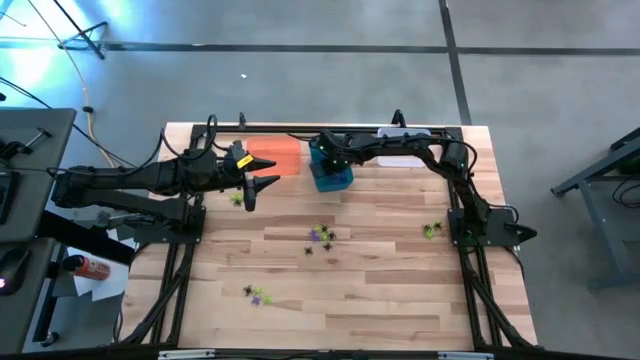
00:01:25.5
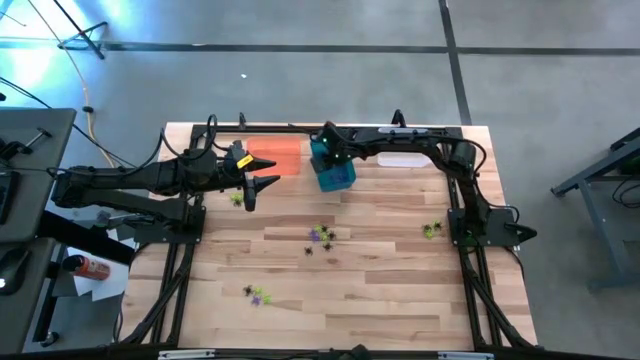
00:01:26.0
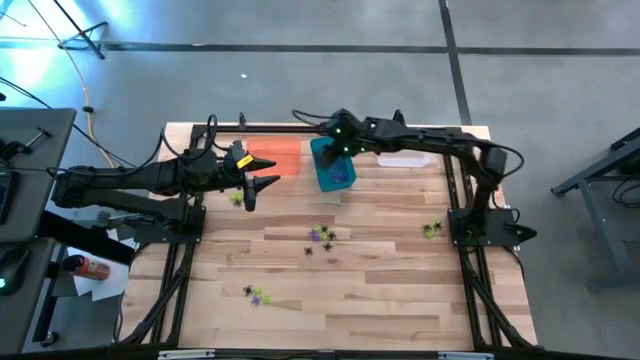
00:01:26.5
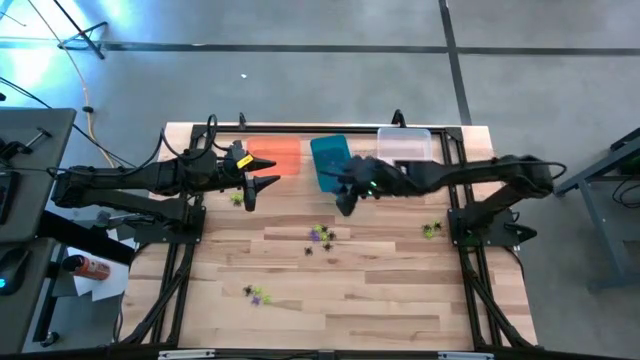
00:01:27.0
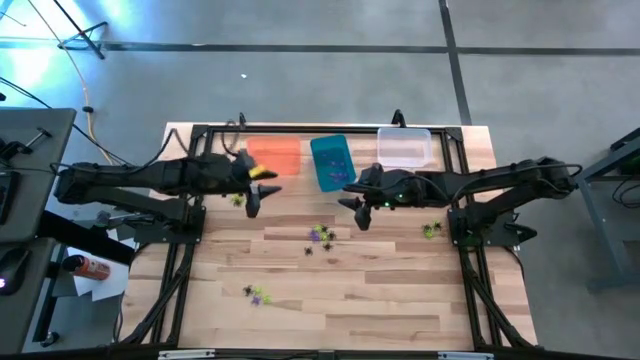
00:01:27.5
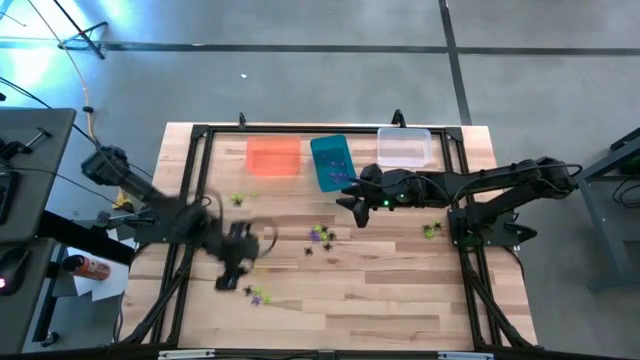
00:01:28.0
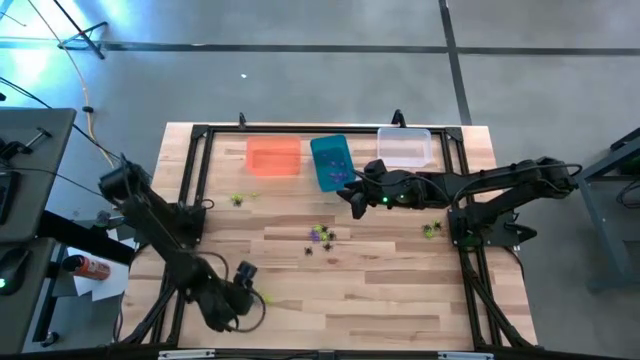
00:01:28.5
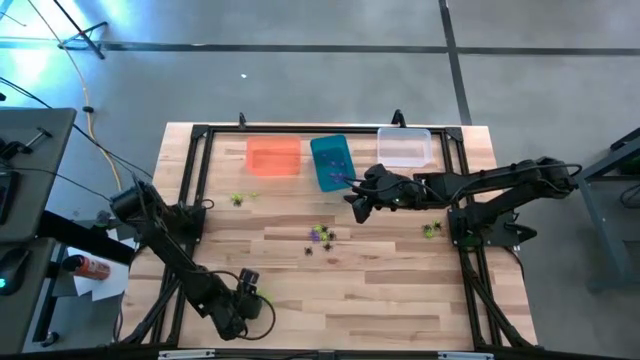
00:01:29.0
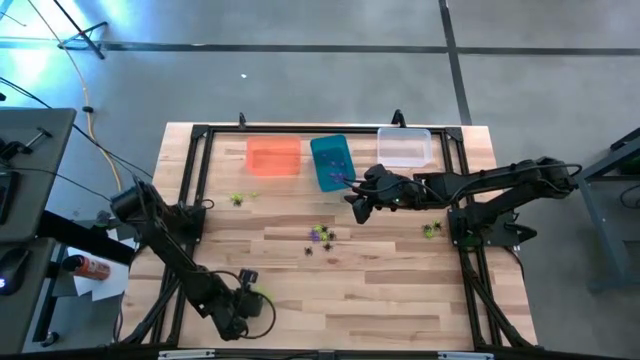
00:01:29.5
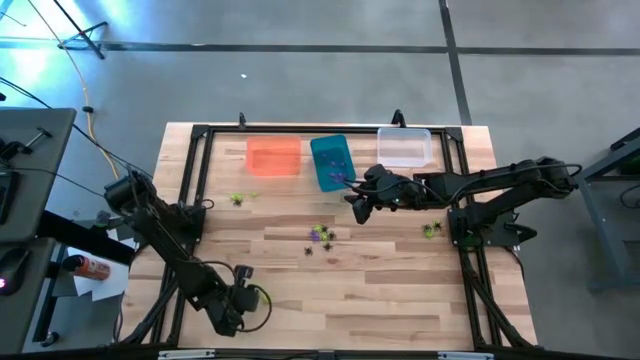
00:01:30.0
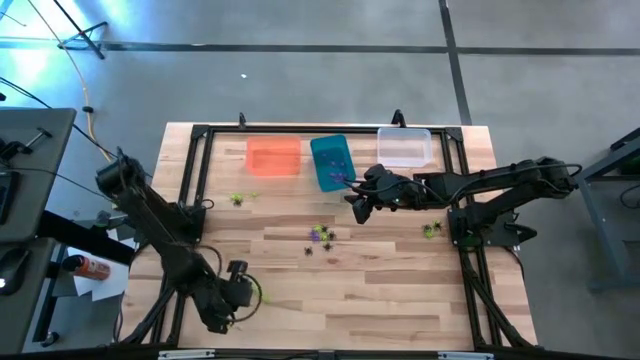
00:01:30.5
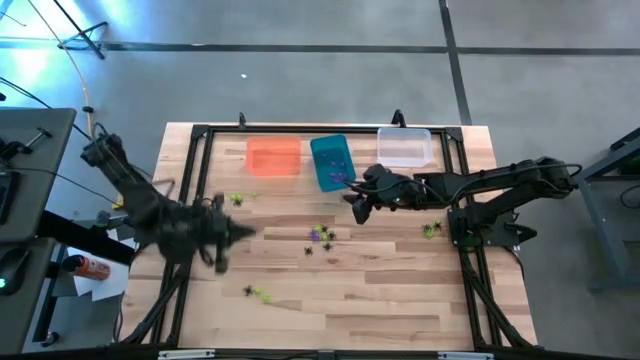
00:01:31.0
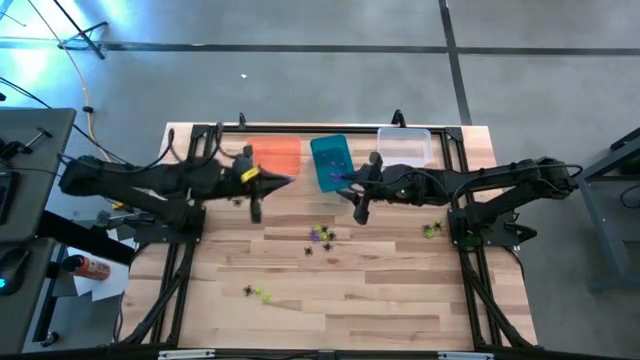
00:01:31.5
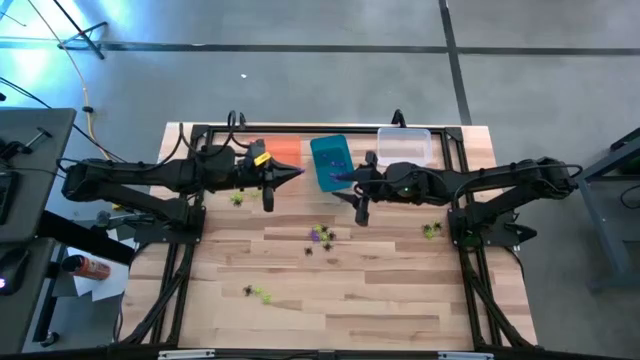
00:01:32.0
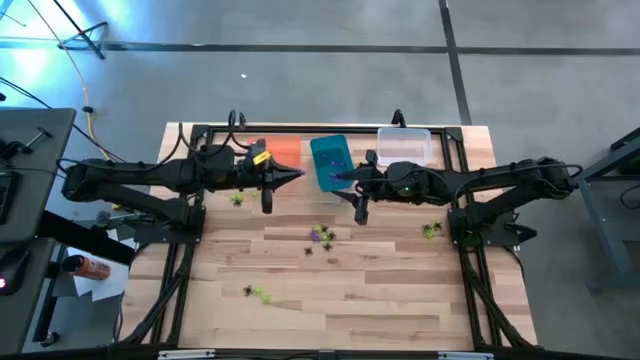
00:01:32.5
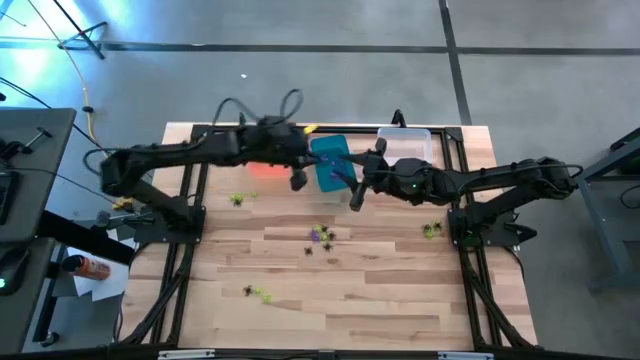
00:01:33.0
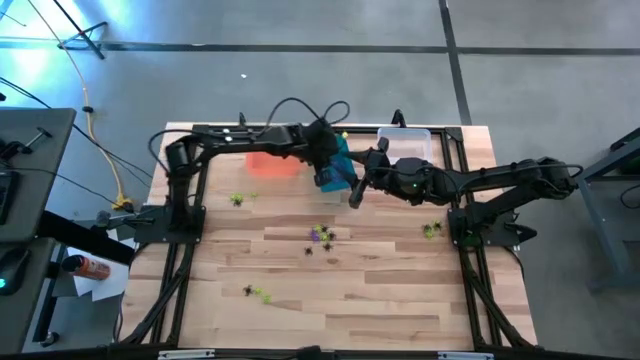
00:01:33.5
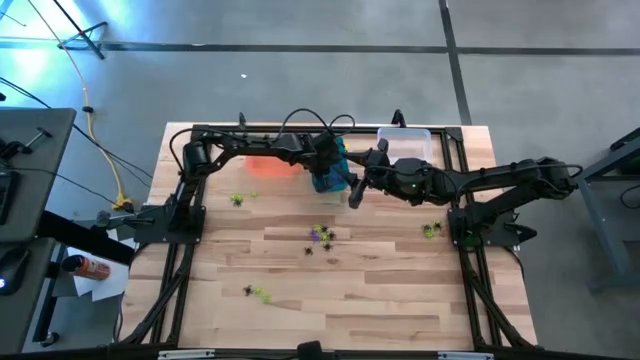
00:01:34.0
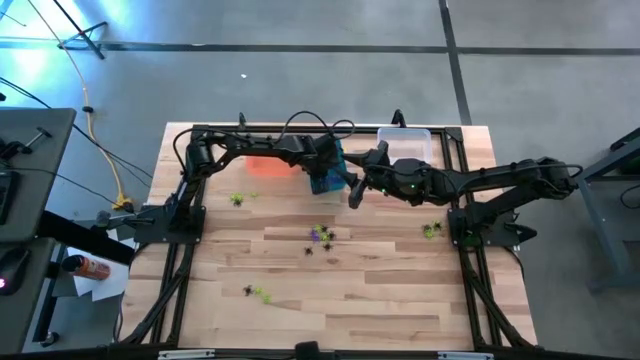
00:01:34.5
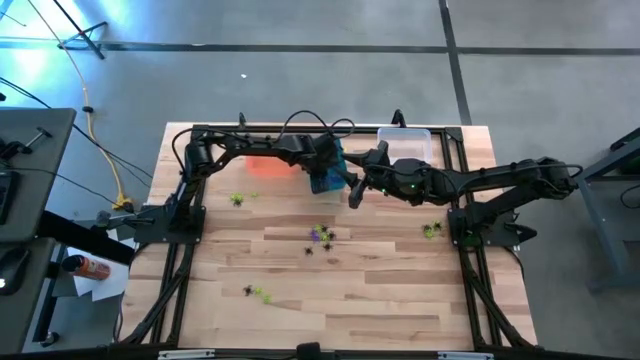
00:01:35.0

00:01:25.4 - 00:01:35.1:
Task: Sort Halloween decoration
Put the purple spider toy into the blue bin

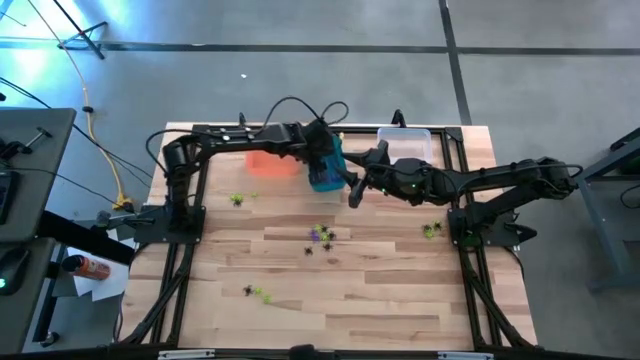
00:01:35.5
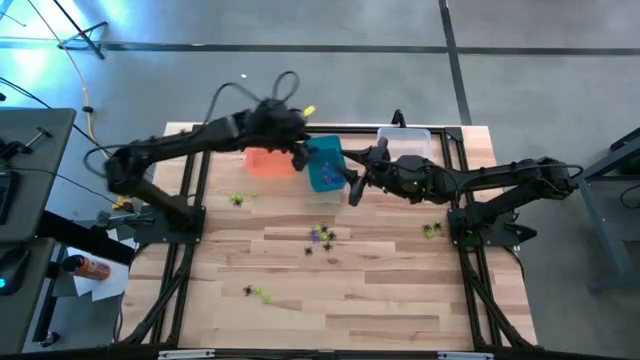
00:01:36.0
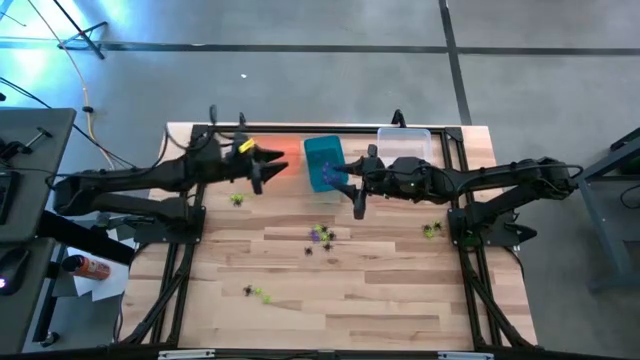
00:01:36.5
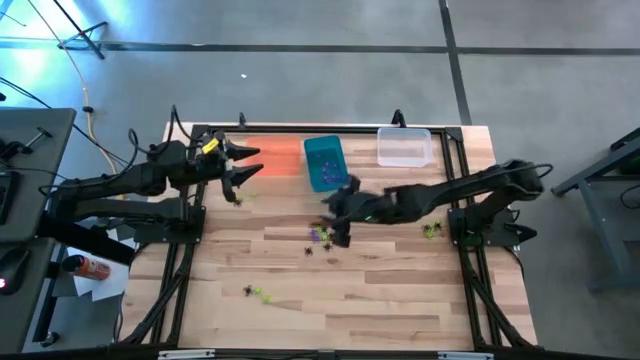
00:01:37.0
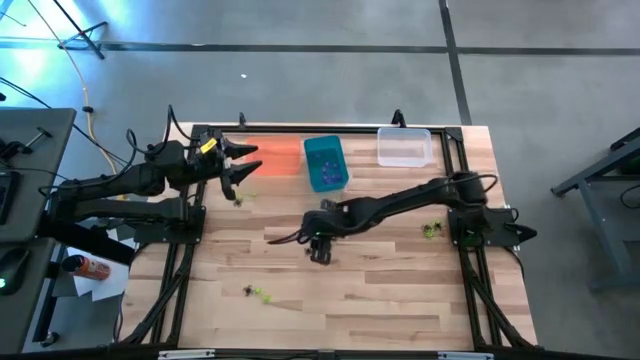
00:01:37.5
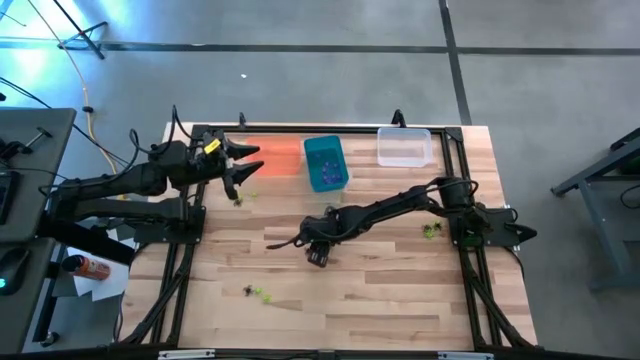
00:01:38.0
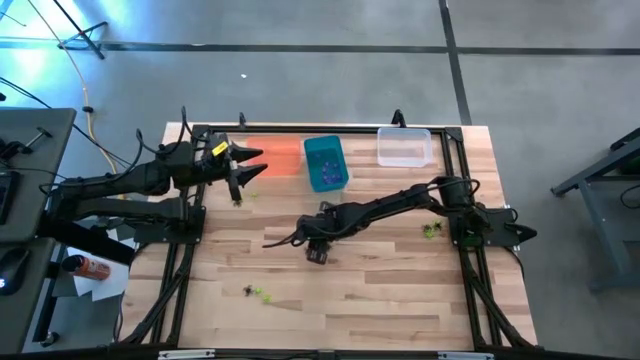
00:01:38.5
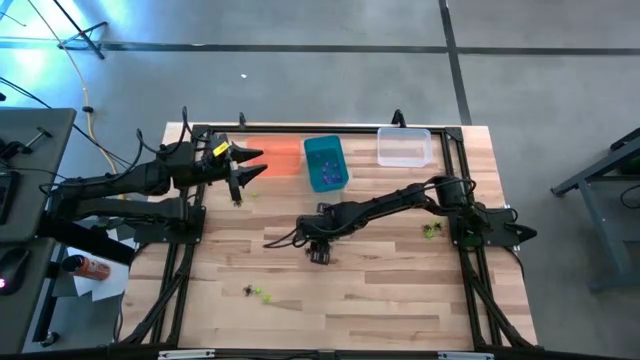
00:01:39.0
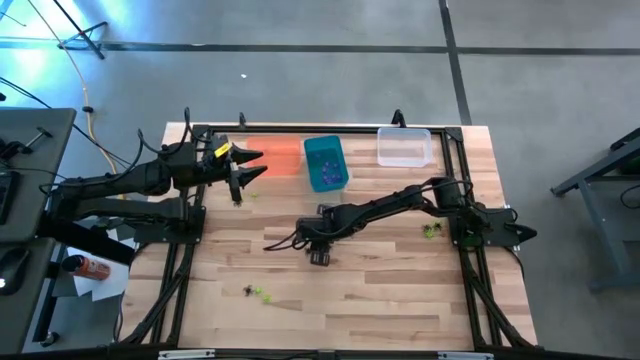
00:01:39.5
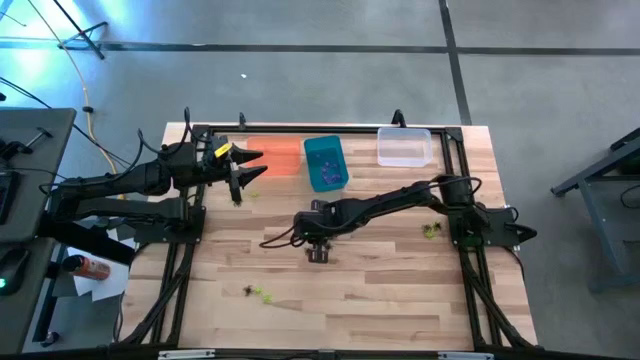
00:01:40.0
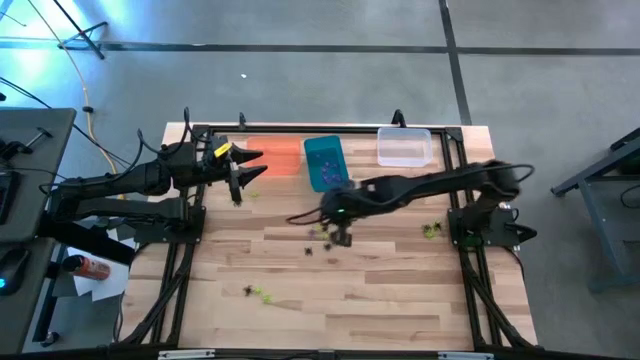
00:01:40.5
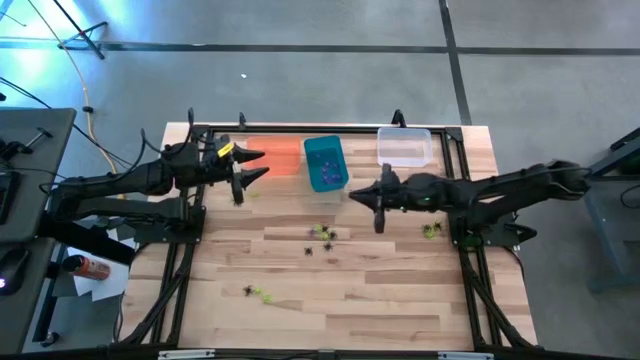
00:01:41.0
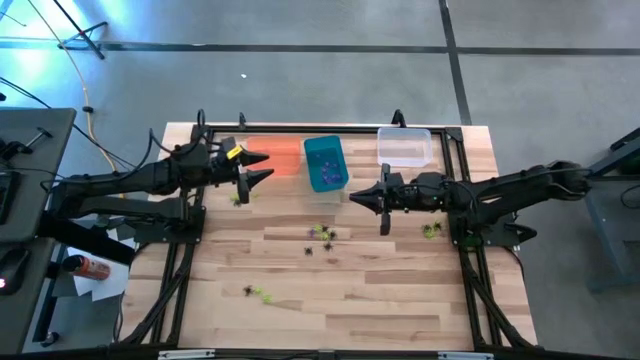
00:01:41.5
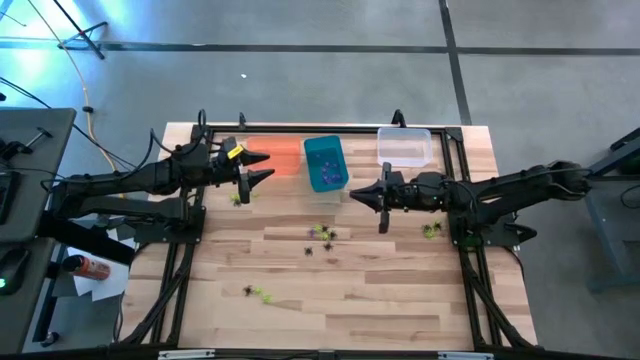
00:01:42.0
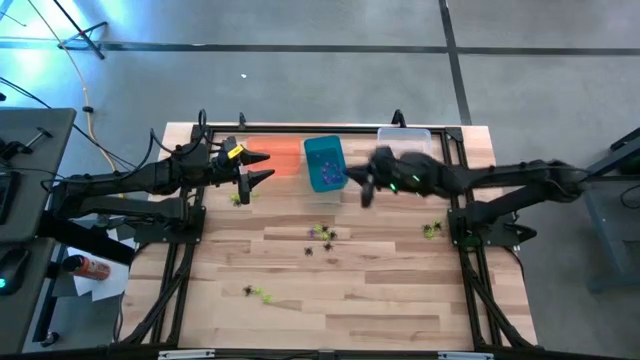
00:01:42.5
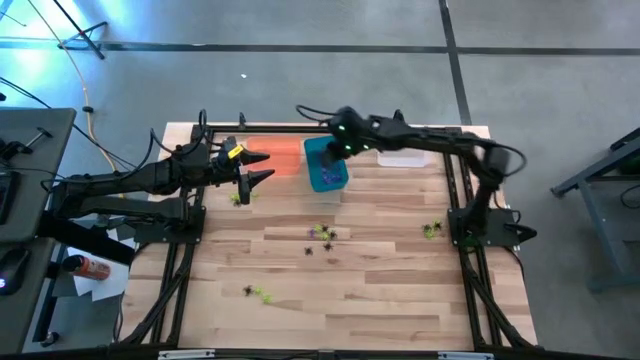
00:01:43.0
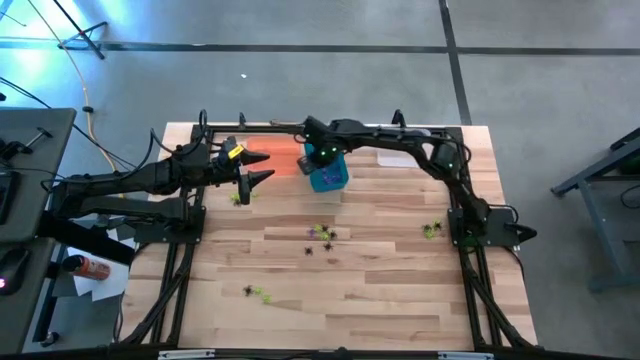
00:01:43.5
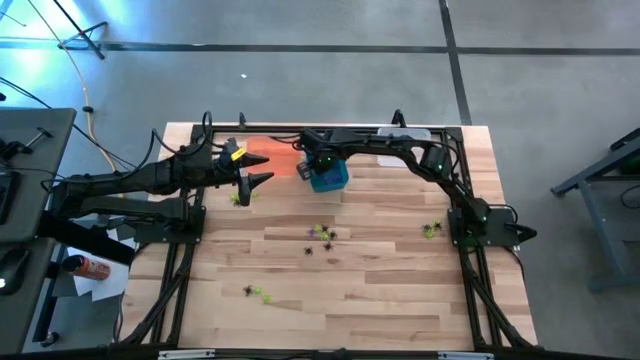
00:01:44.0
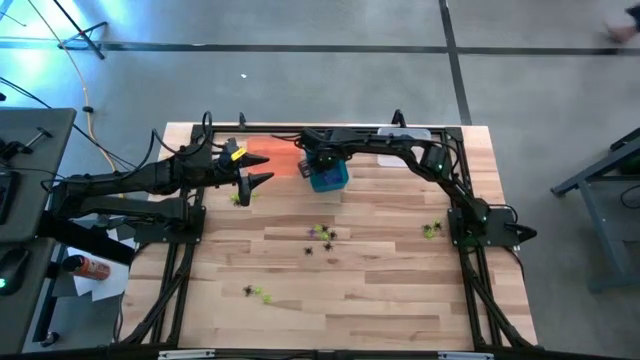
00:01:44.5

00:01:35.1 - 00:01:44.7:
Put the purple spider toy into the blue bin

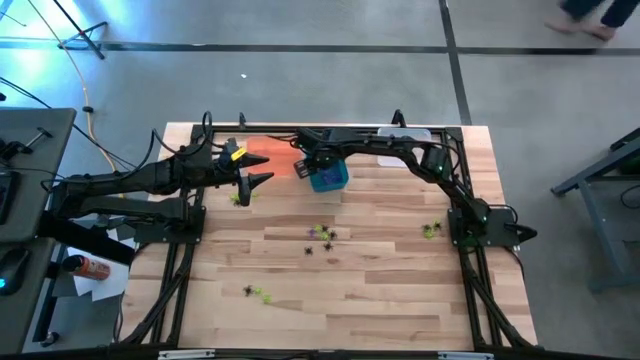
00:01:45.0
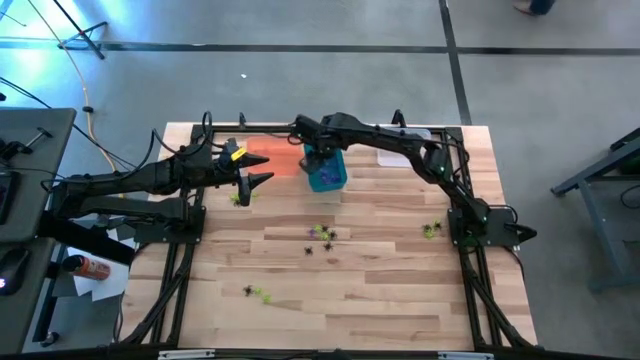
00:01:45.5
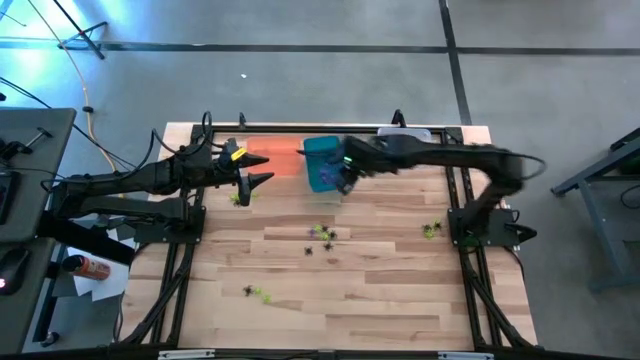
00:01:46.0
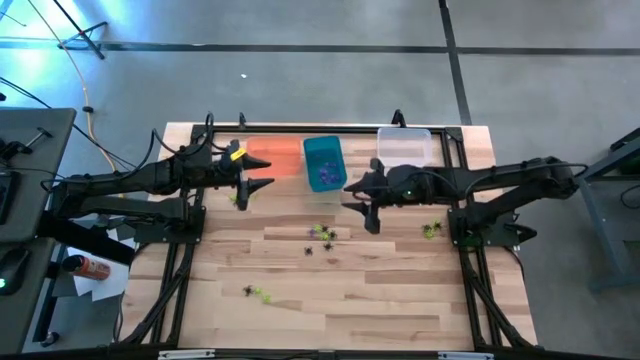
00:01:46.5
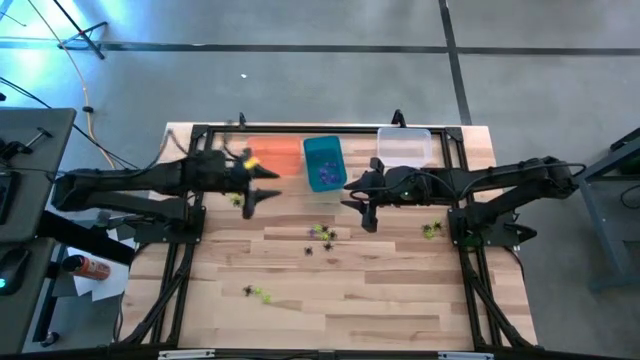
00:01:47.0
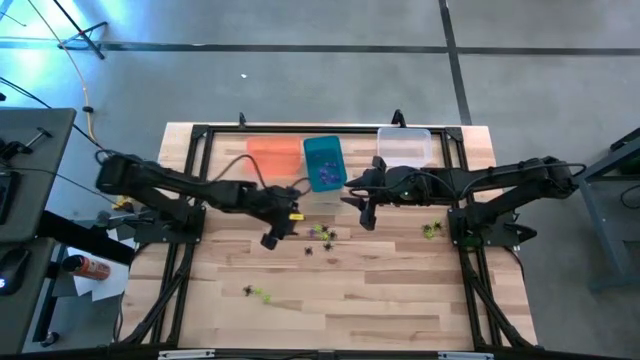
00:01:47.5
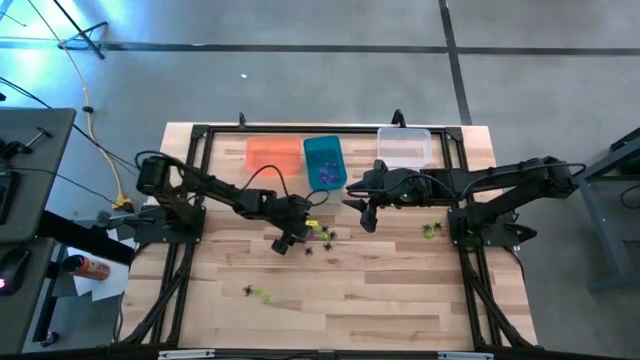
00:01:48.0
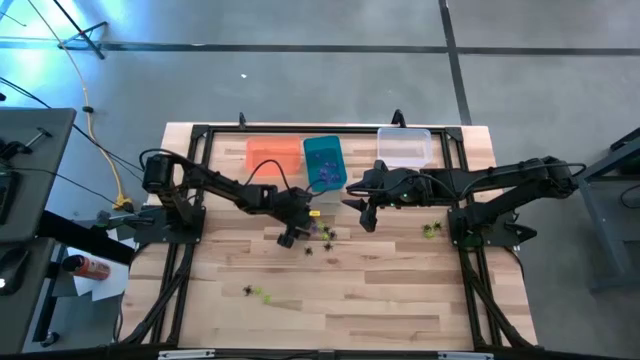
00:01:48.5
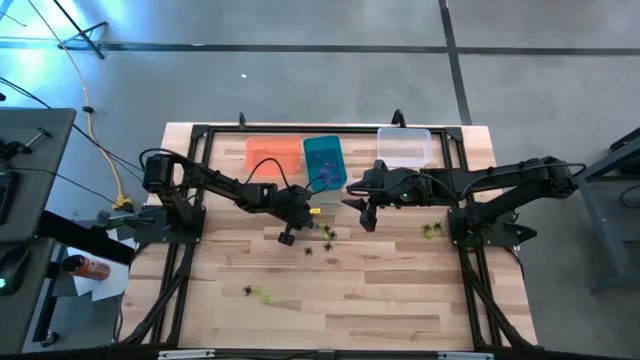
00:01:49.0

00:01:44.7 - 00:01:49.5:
Put the purple spider toy into the blue bin
